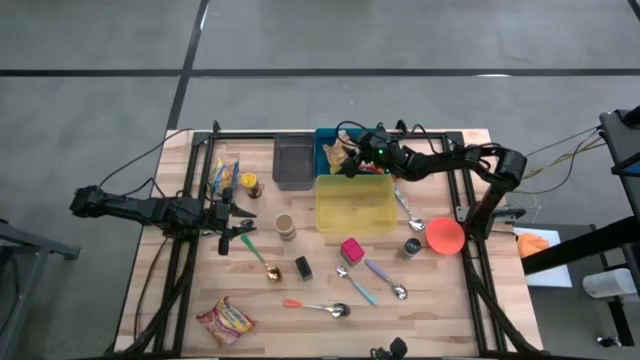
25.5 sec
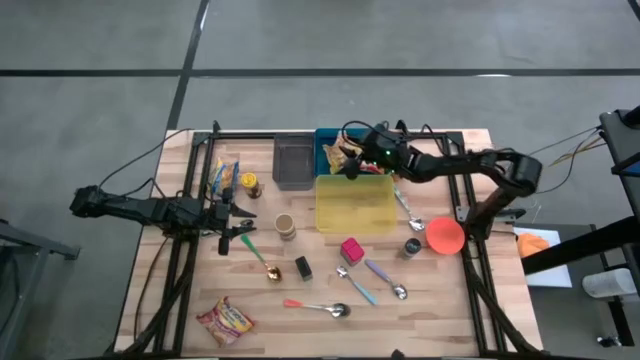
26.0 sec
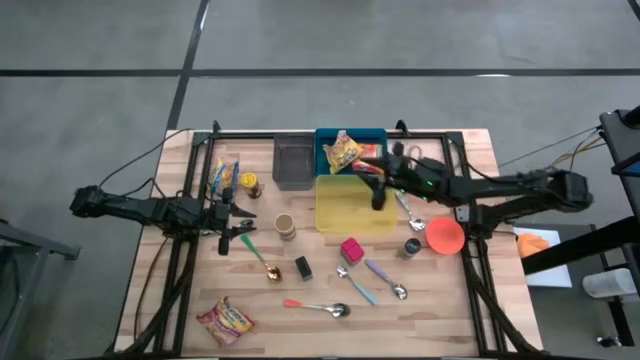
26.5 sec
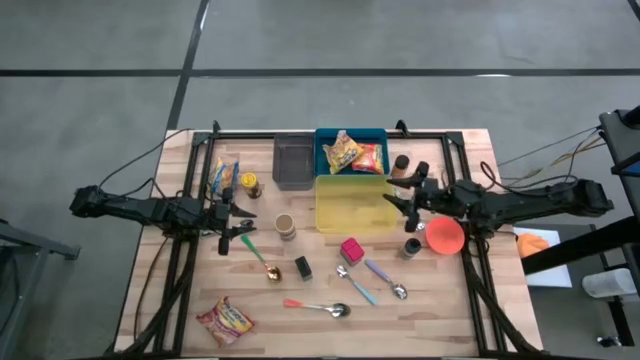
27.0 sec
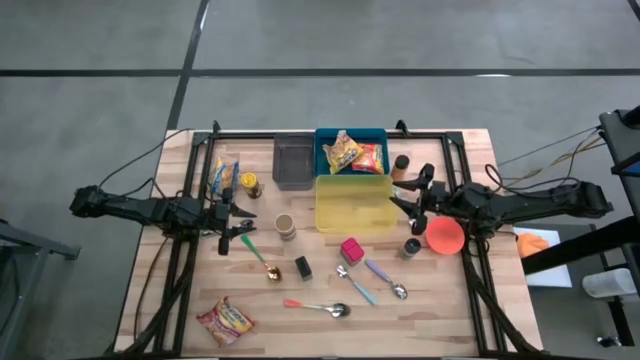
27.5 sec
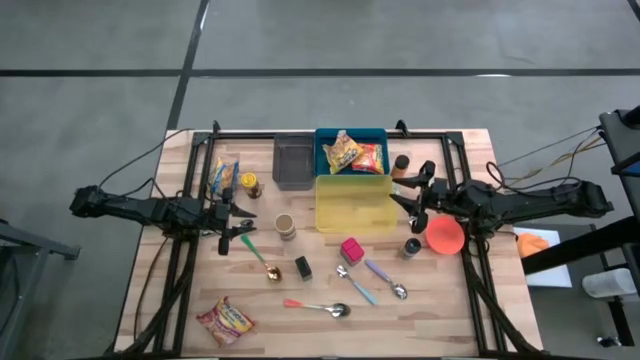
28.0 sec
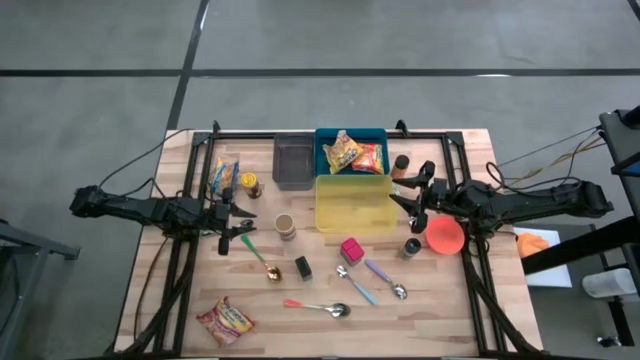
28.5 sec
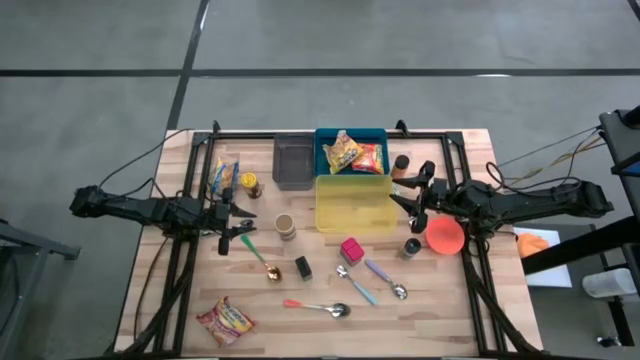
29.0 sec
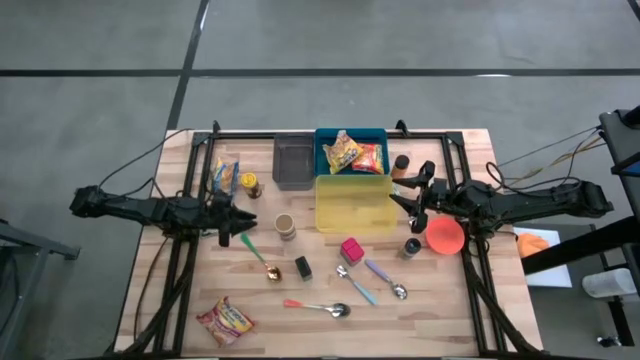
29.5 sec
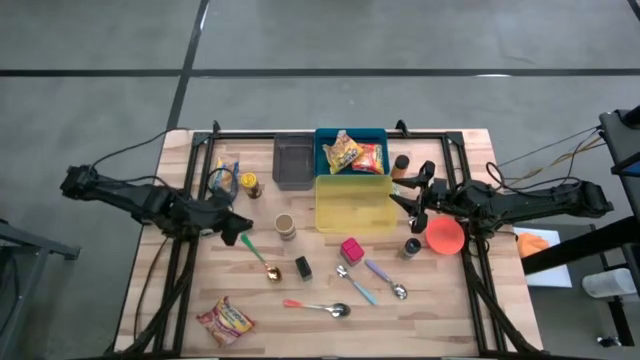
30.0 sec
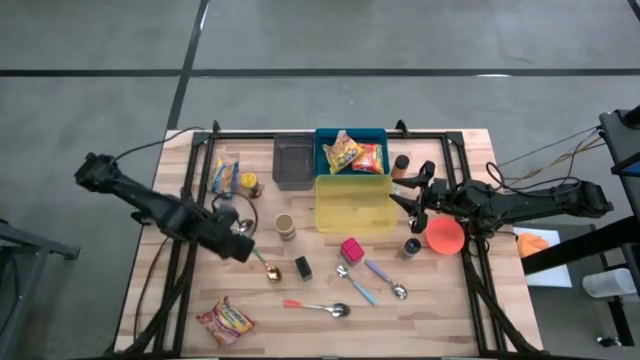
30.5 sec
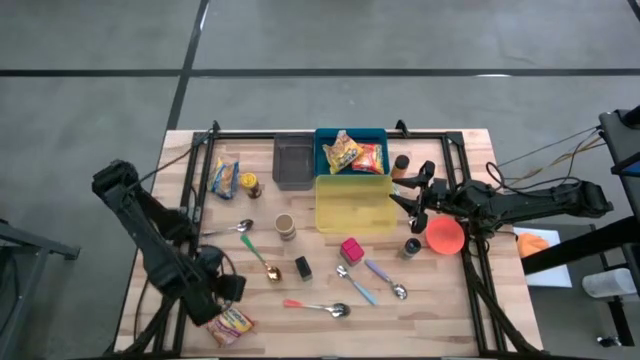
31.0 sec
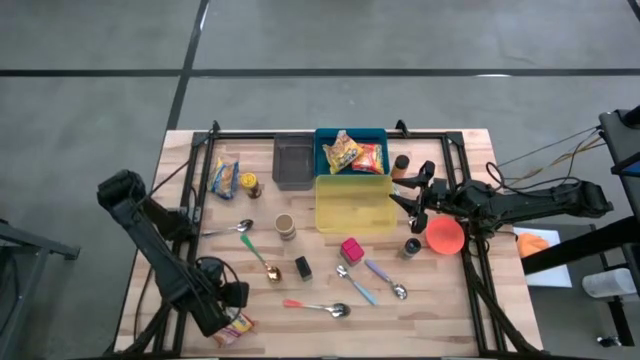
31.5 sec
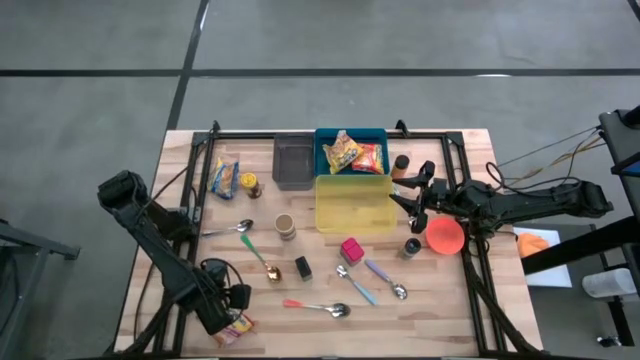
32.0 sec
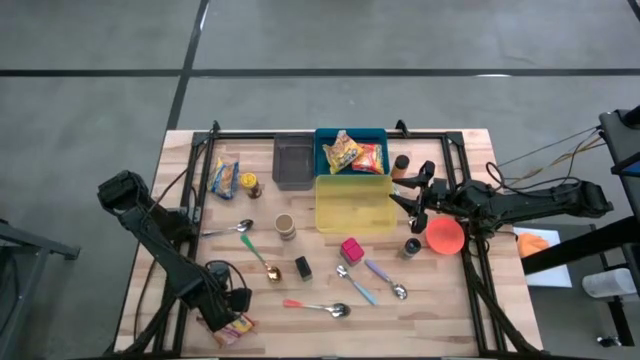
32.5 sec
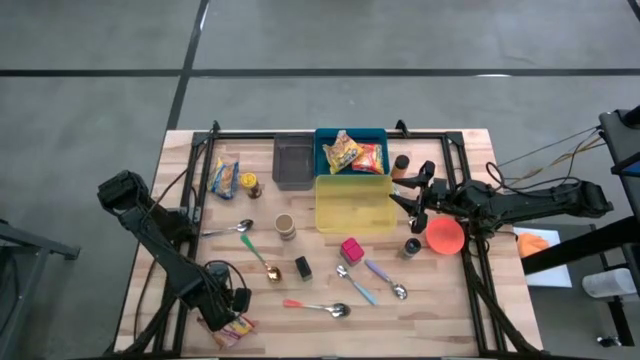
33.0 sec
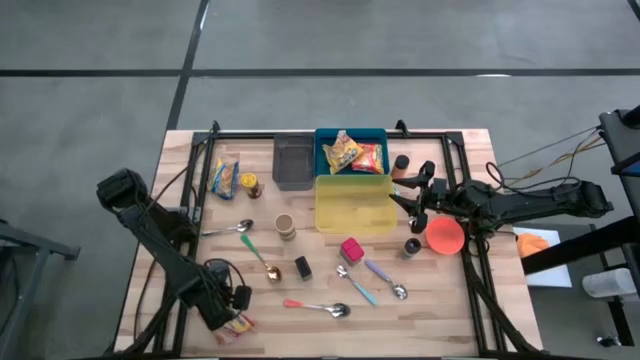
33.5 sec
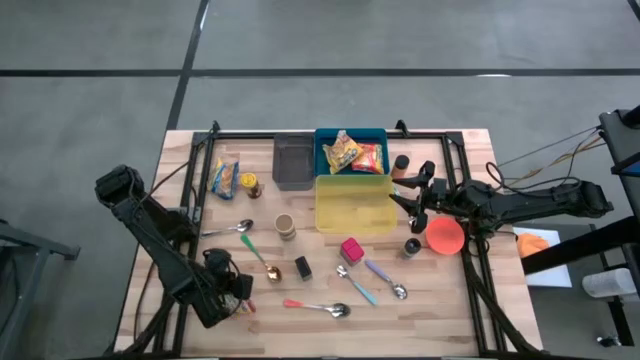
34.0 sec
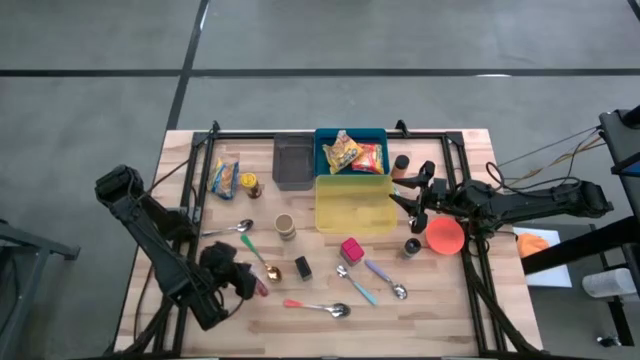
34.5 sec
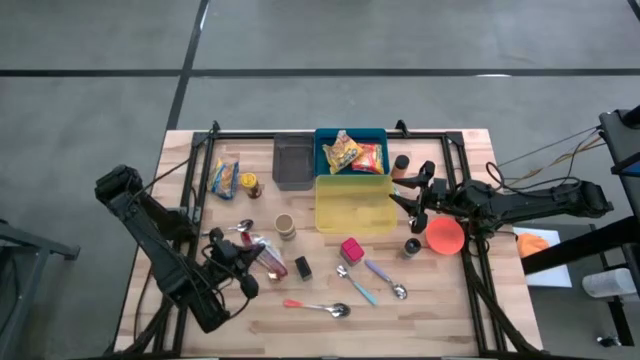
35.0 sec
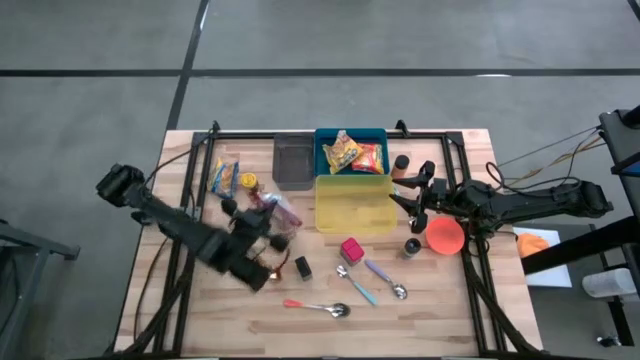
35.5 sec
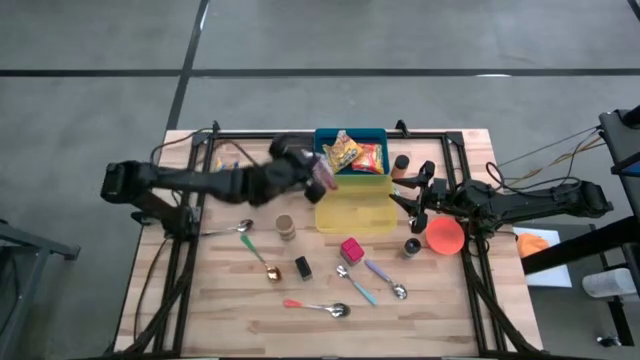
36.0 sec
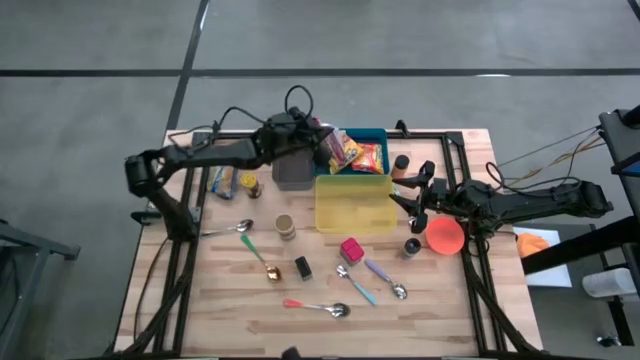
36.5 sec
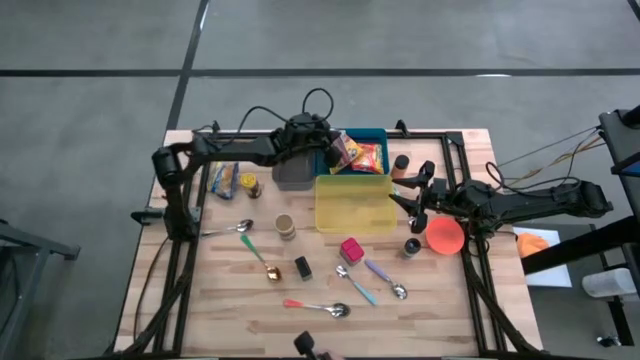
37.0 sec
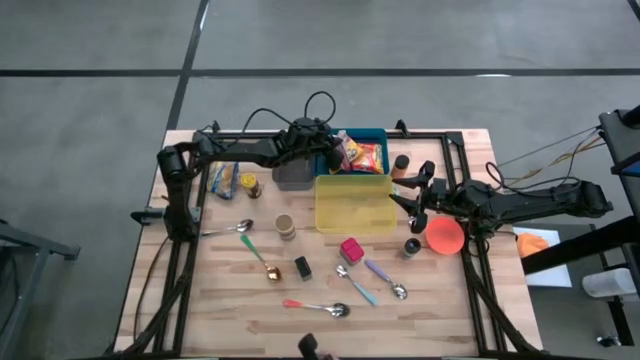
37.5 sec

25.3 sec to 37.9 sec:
Put the red noodle pack into the blue bin

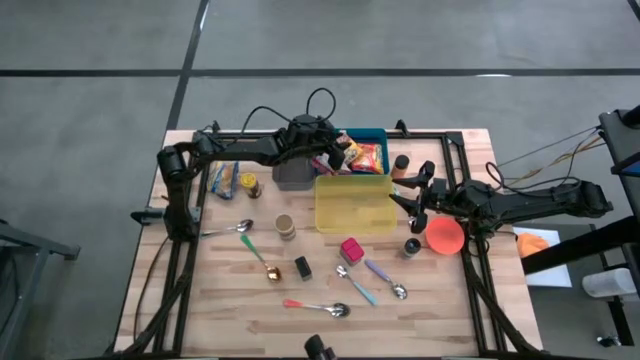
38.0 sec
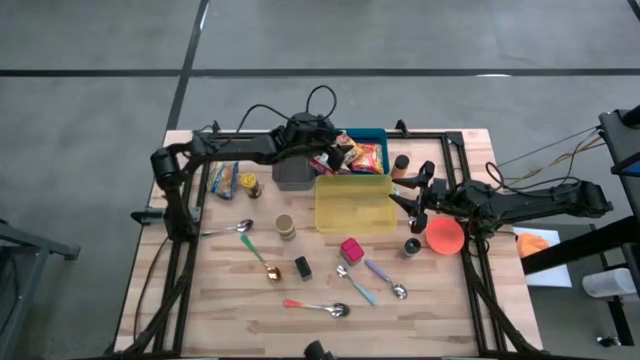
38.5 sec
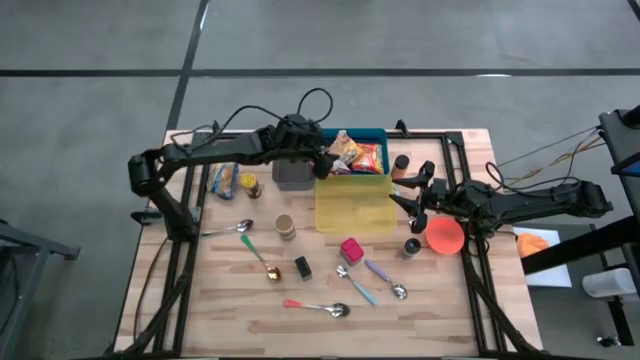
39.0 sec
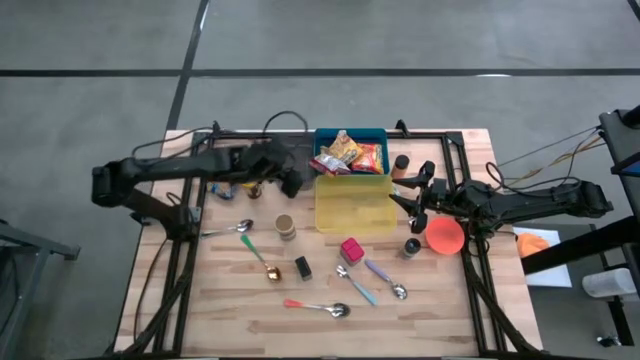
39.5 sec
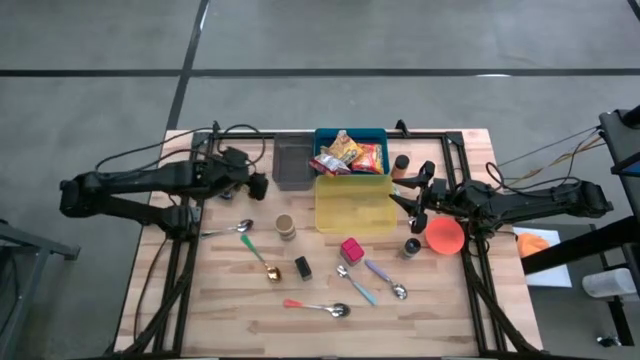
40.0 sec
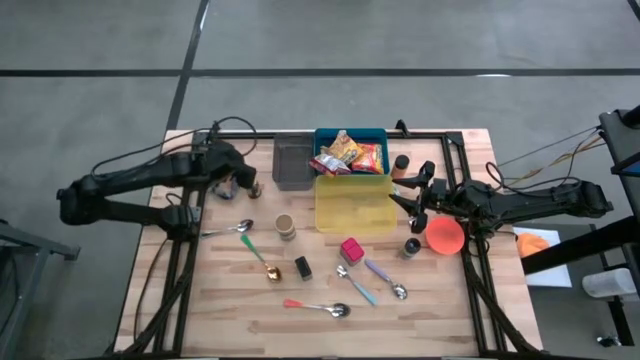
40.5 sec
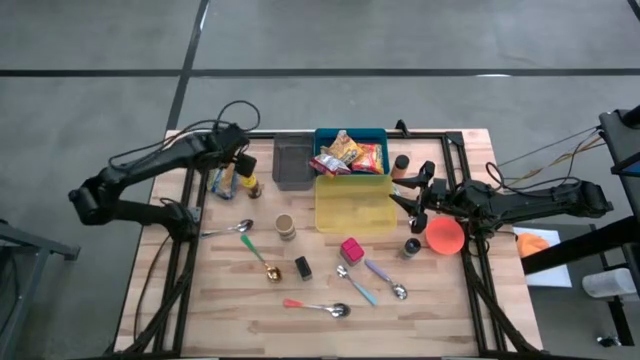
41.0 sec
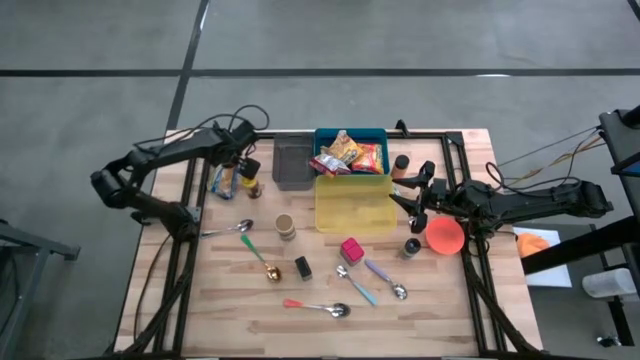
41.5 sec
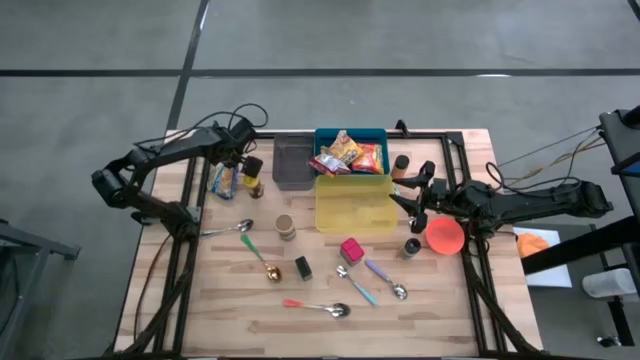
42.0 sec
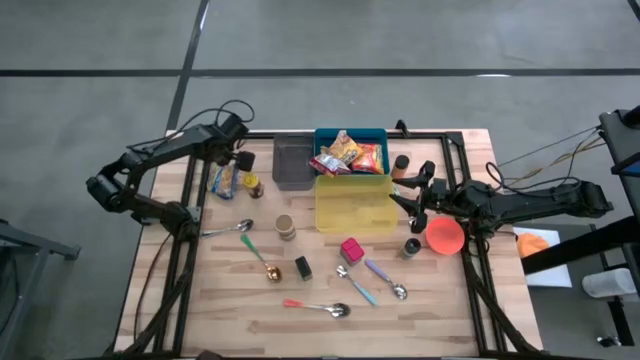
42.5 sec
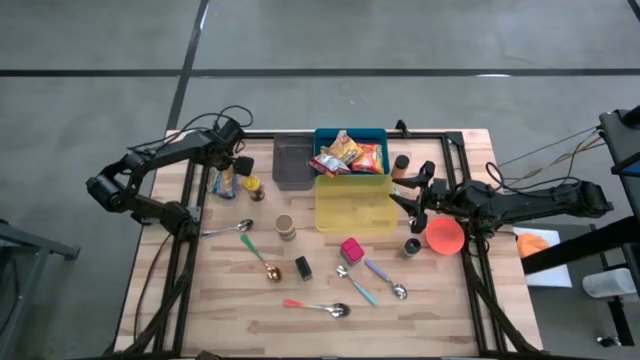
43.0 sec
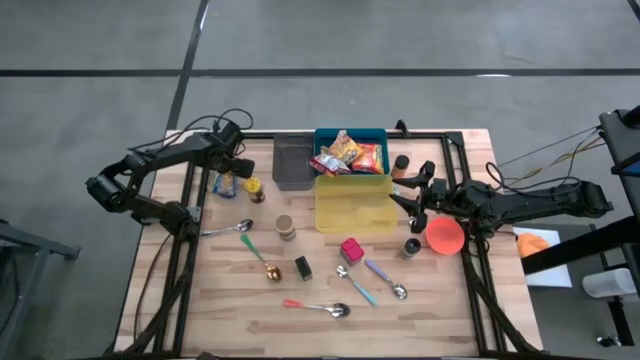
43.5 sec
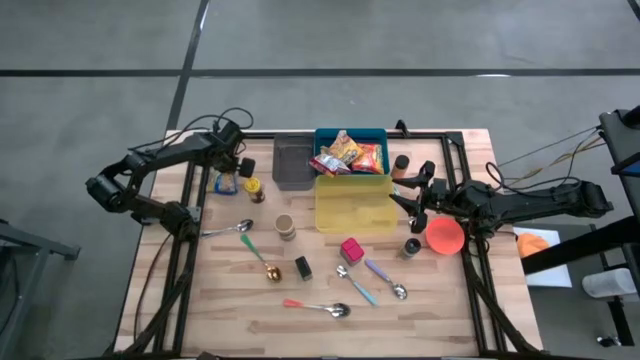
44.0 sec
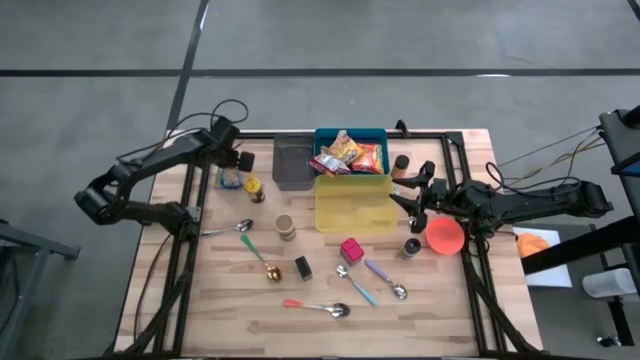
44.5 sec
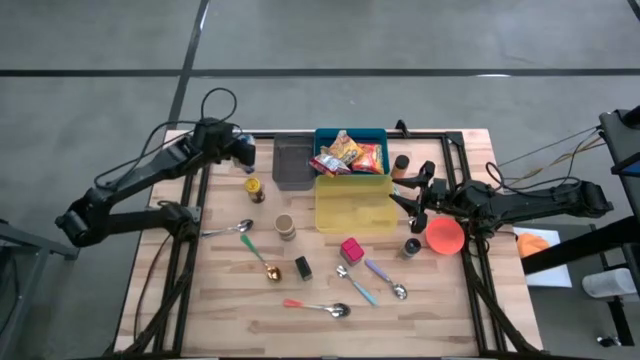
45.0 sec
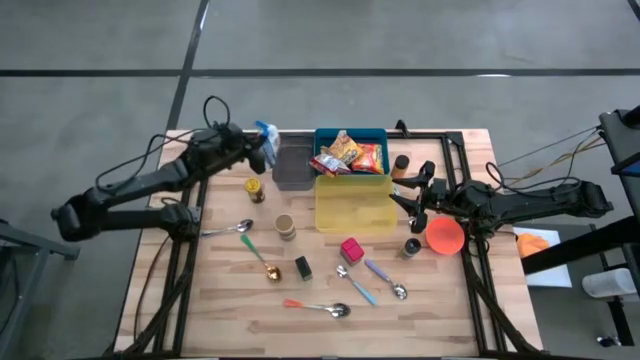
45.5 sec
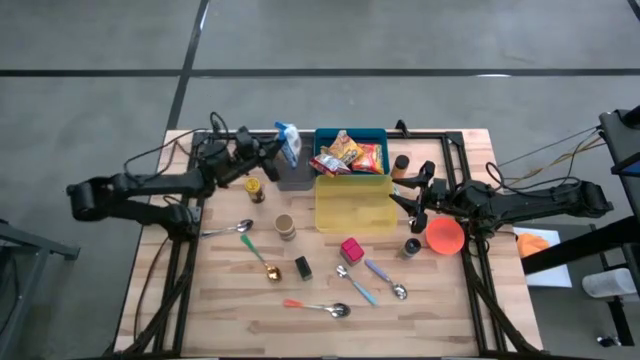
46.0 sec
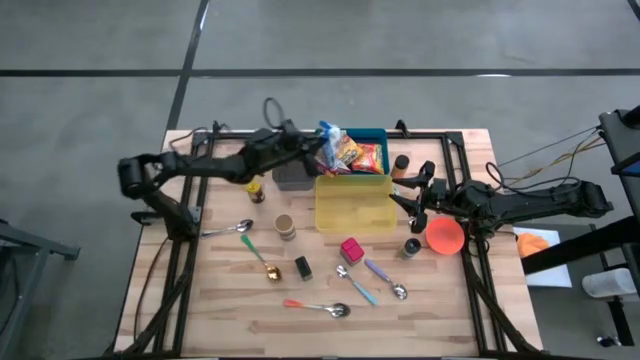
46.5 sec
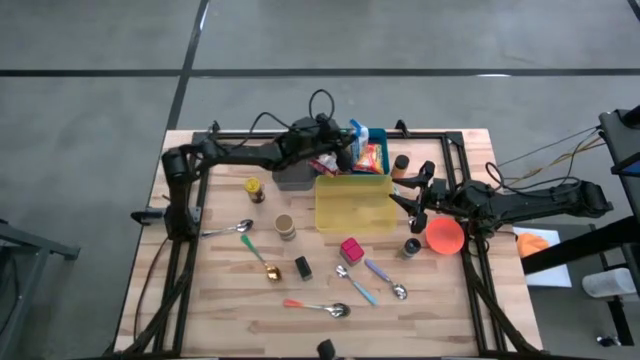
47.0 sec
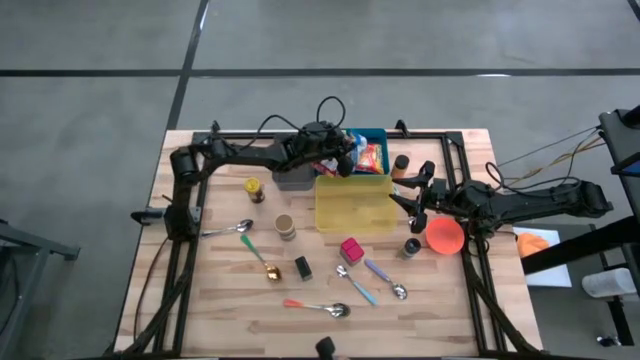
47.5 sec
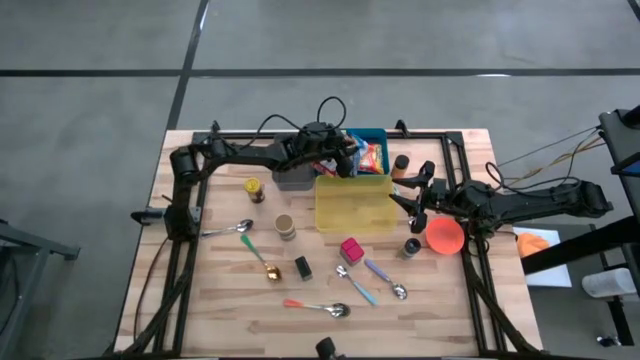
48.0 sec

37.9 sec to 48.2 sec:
Put the blue noodle pack into the blue bin
